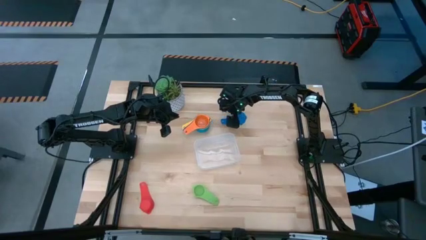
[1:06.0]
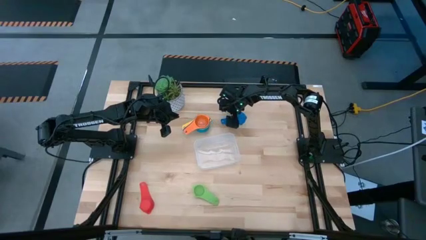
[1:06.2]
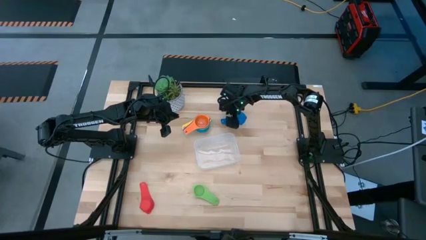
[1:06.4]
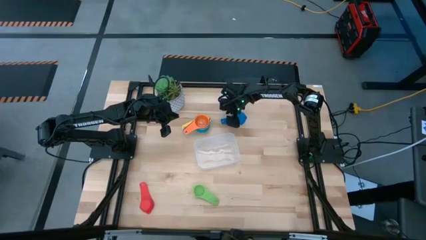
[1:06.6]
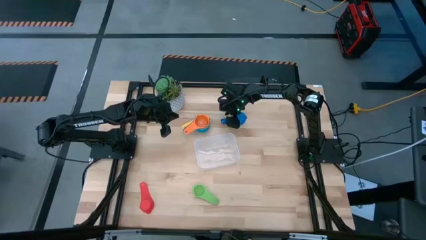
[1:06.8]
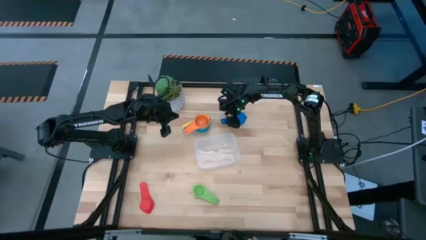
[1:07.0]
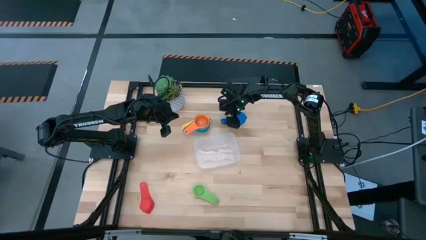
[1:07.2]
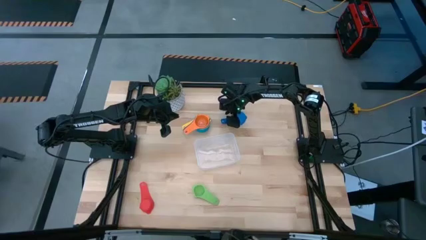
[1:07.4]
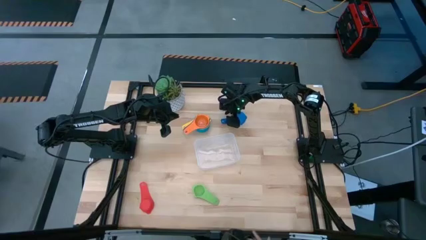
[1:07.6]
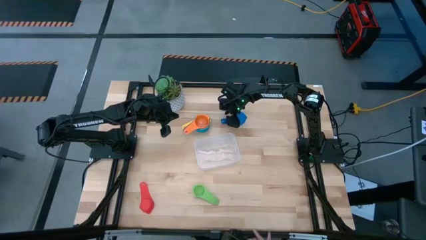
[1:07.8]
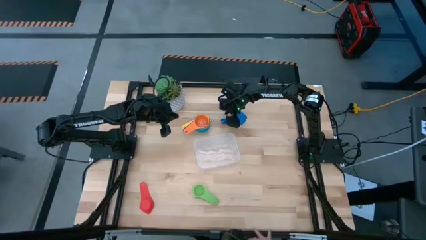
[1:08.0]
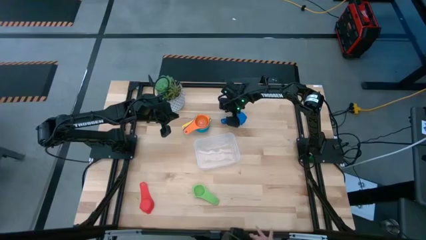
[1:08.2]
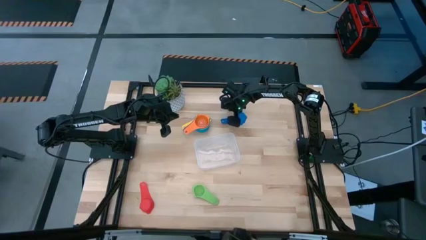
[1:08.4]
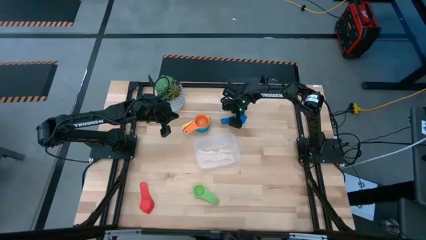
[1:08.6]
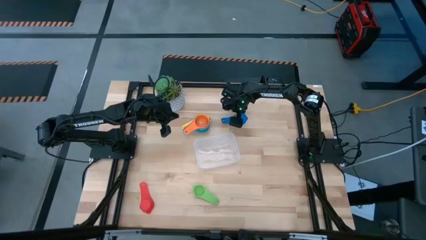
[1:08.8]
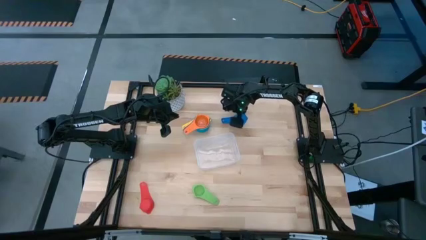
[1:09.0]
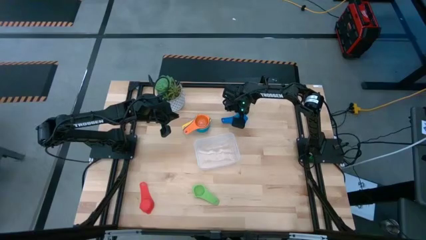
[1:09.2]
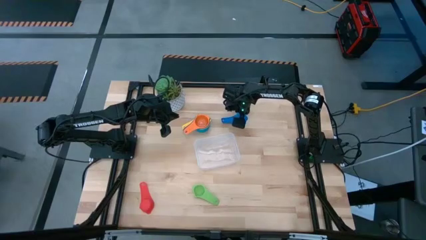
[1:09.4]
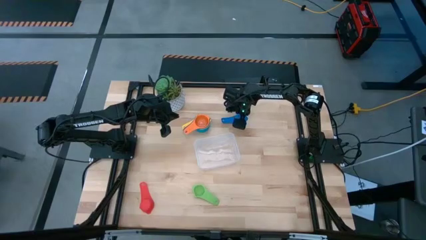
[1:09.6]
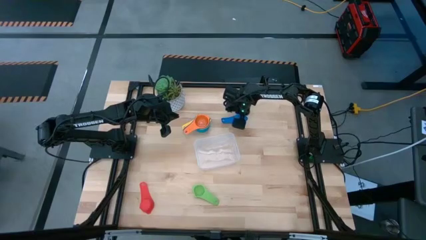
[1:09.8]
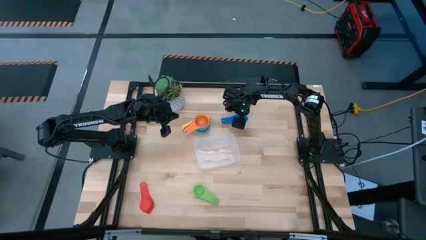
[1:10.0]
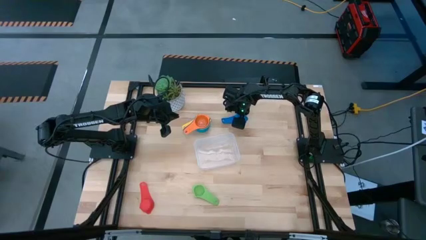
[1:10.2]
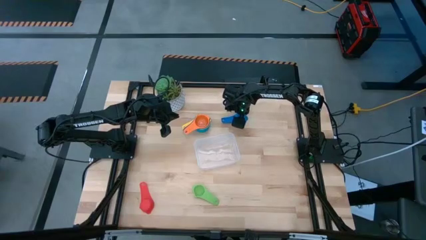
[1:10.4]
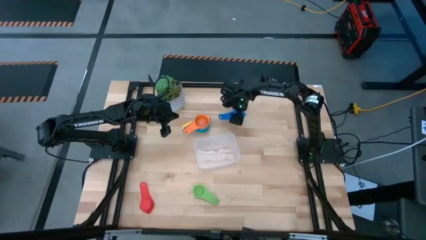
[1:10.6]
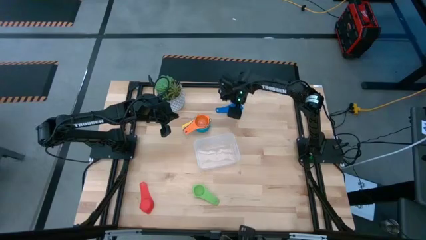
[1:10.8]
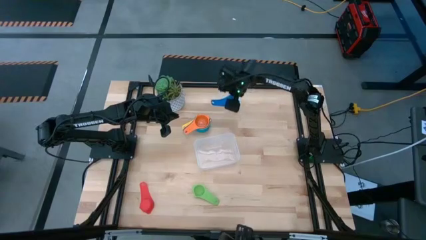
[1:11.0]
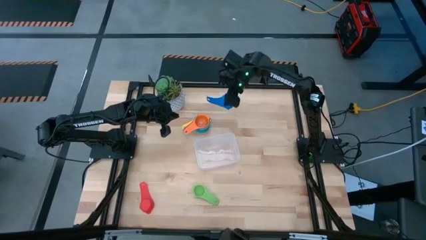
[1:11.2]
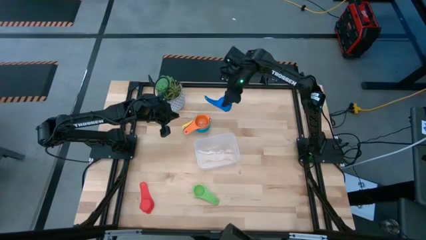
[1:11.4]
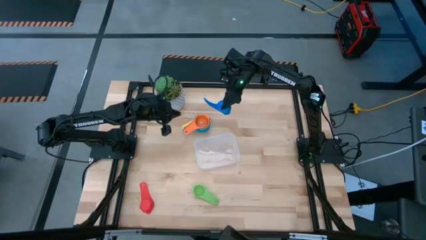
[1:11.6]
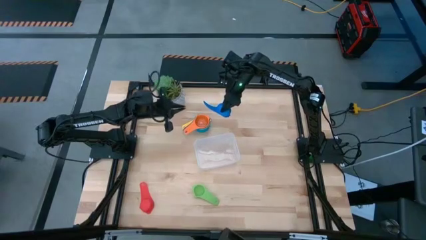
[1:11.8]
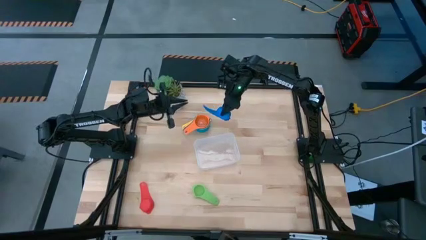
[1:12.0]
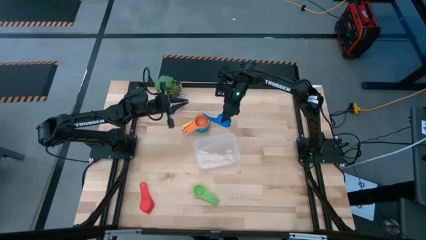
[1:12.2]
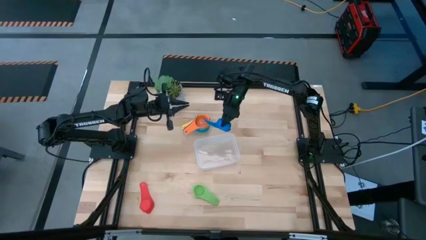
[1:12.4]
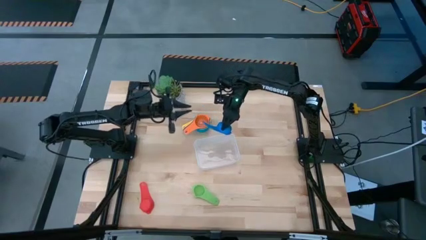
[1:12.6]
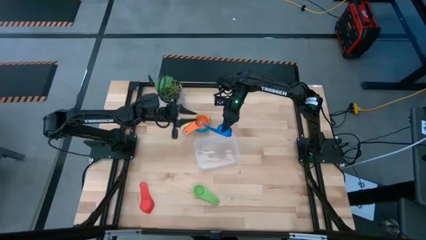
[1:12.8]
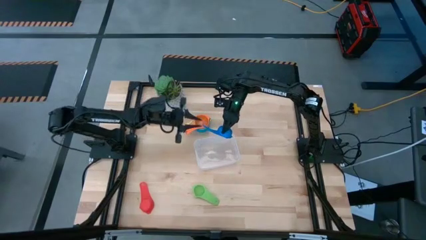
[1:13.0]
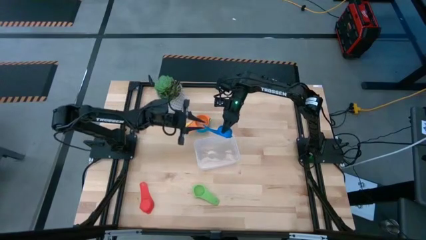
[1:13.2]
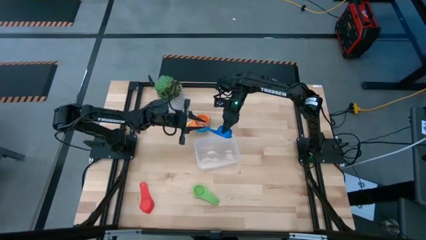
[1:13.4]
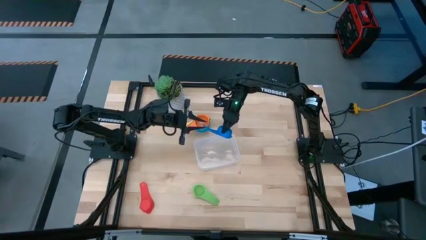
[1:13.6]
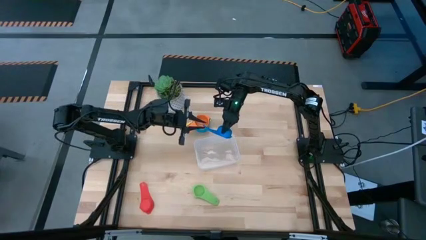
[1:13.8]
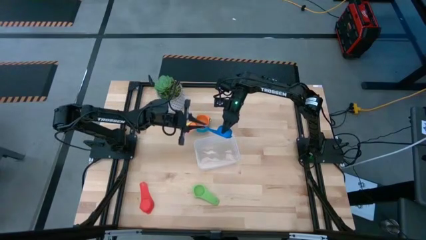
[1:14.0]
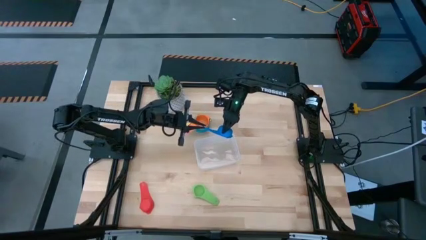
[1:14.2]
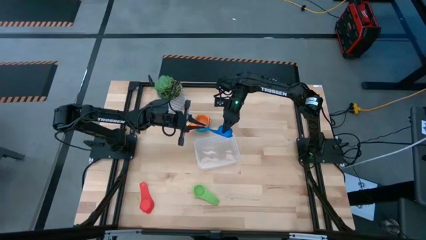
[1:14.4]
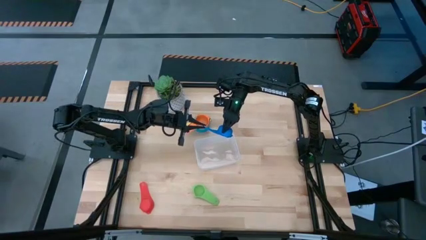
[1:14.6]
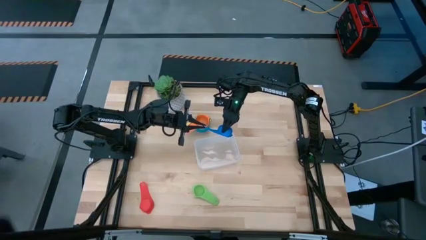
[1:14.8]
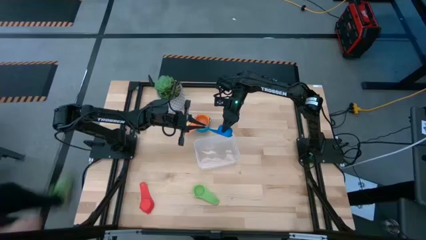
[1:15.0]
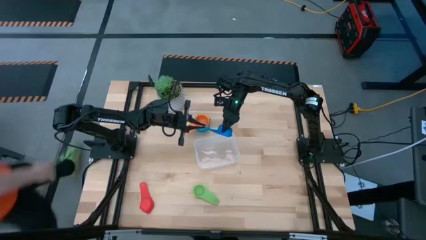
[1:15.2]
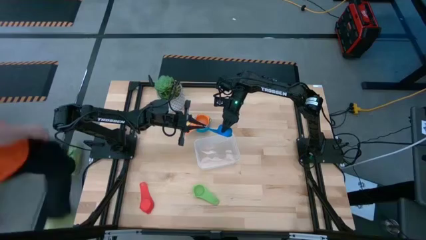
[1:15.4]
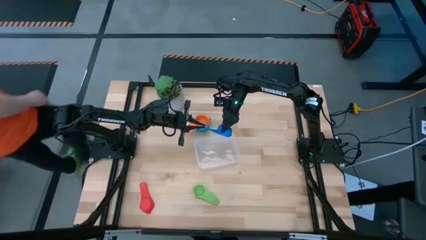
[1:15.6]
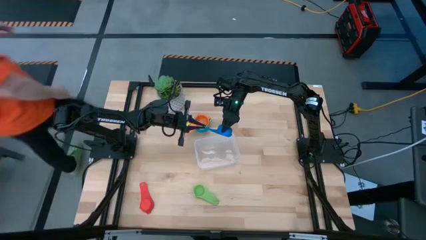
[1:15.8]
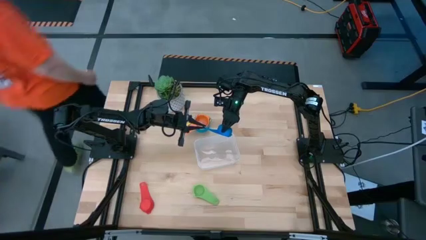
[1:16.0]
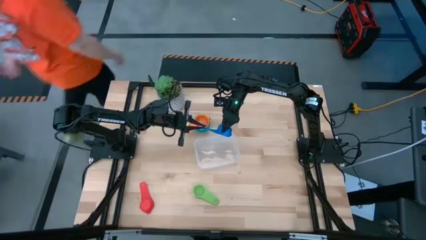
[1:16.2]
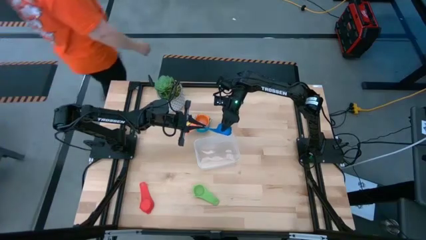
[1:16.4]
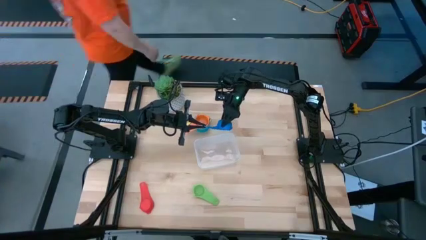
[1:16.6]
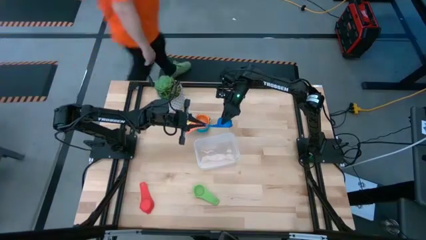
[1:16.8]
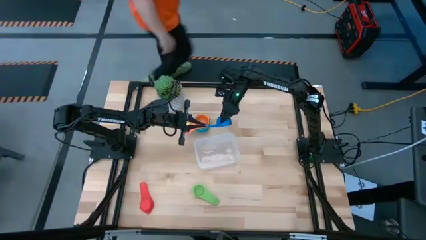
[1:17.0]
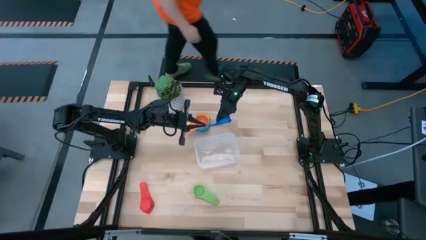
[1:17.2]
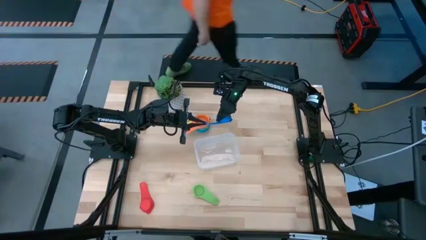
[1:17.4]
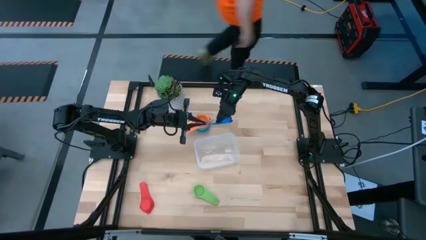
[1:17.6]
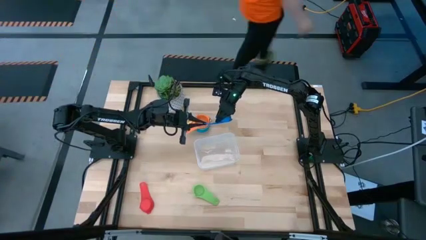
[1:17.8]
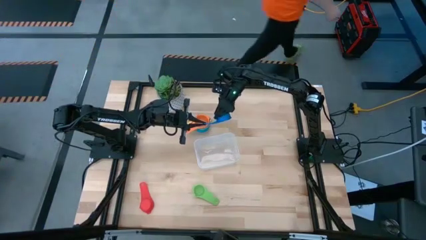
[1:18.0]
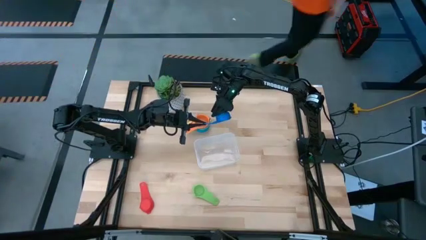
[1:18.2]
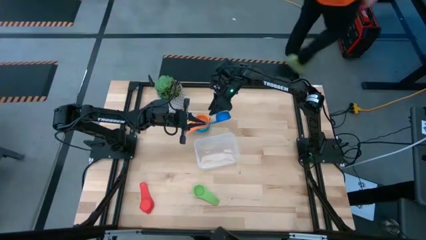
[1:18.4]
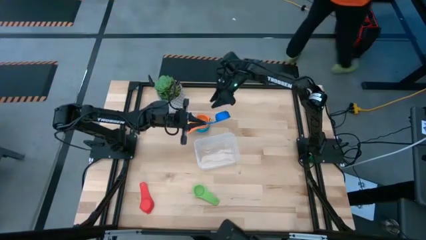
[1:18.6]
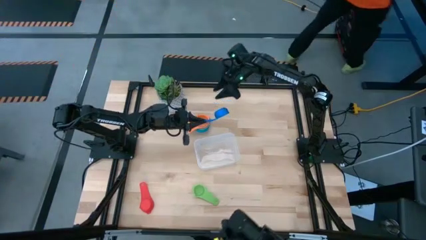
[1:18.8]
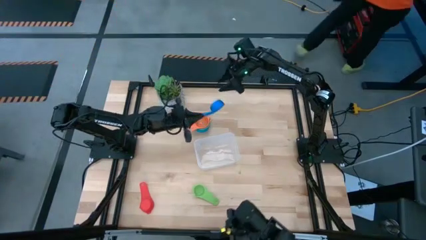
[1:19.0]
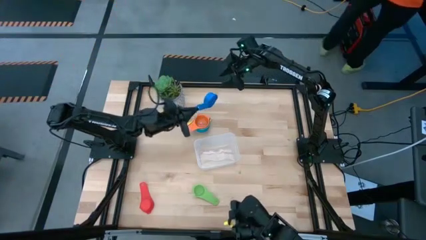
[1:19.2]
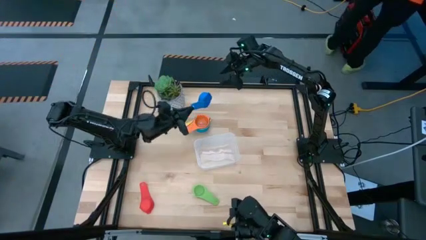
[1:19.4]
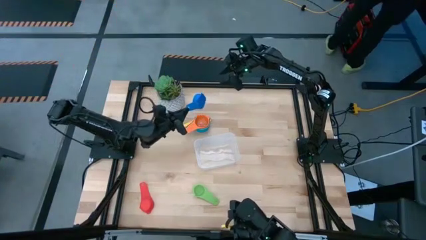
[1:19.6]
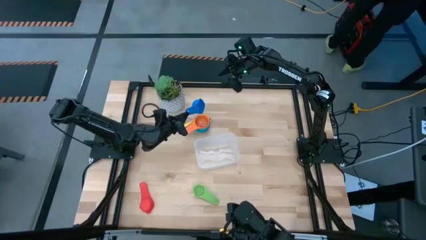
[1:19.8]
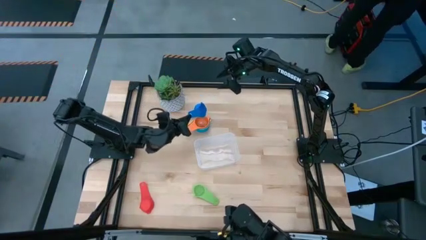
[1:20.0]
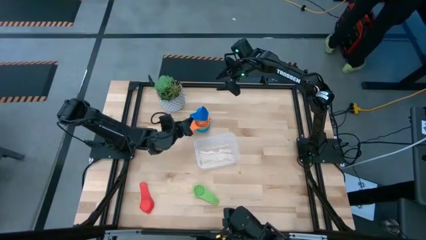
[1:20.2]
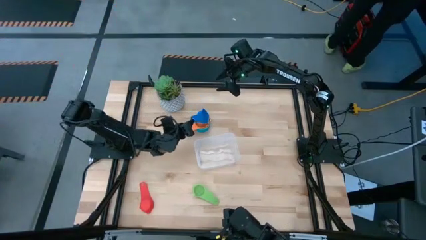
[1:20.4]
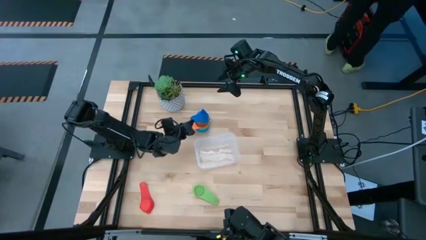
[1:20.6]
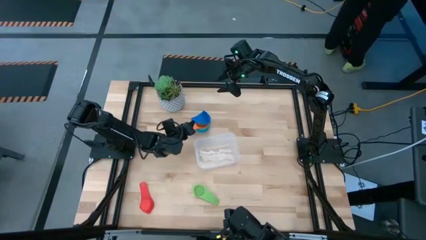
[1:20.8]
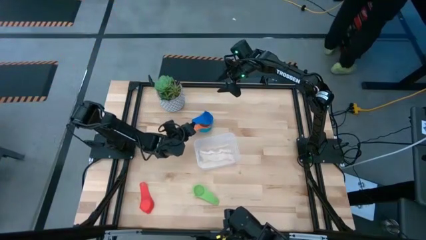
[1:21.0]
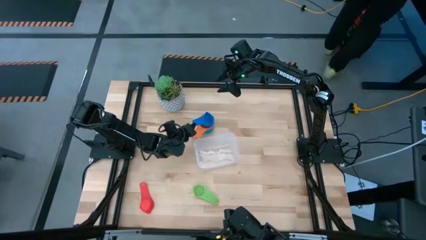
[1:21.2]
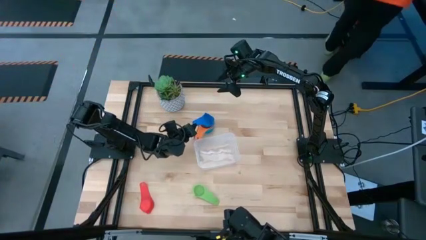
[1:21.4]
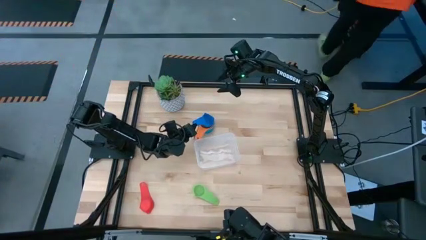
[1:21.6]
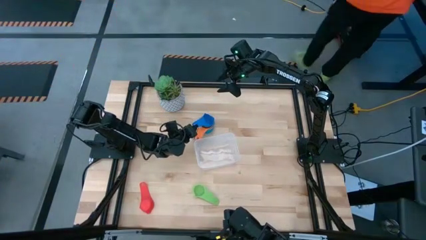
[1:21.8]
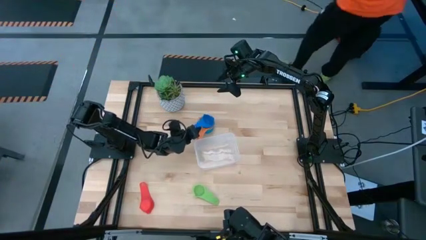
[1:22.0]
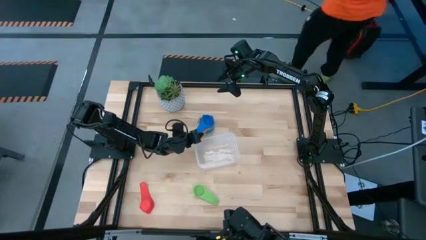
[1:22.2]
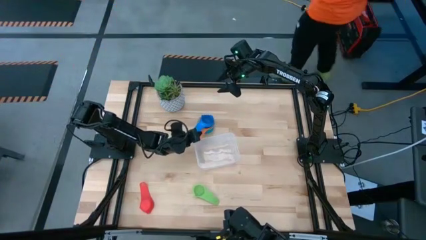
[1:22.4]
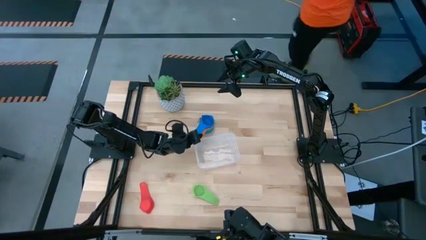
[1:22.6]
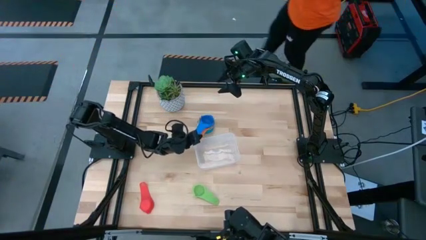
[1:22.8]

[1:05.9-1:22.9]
Task: Nest measuring cups in basket
Stack the blue measuring cup on top of the orange measuring cup
